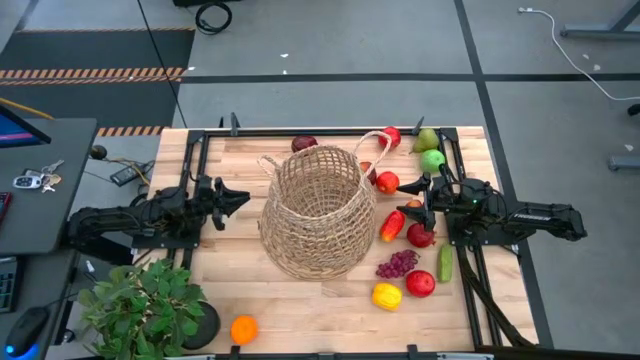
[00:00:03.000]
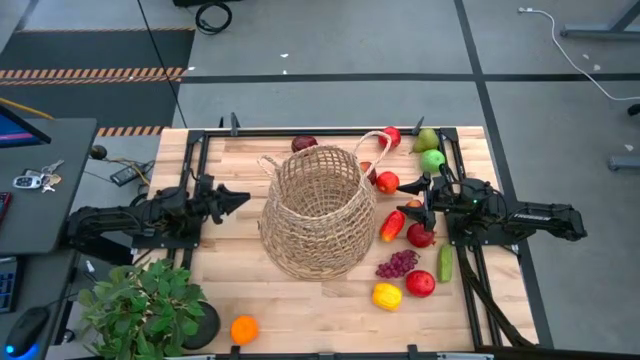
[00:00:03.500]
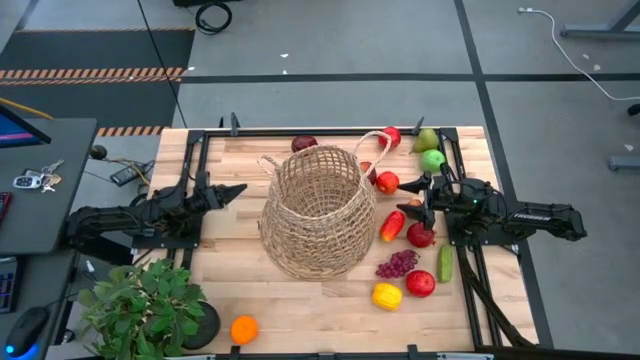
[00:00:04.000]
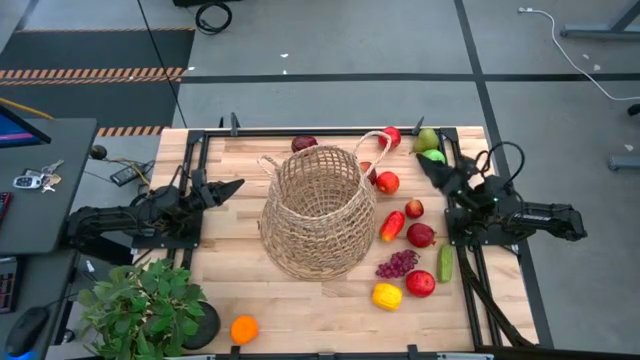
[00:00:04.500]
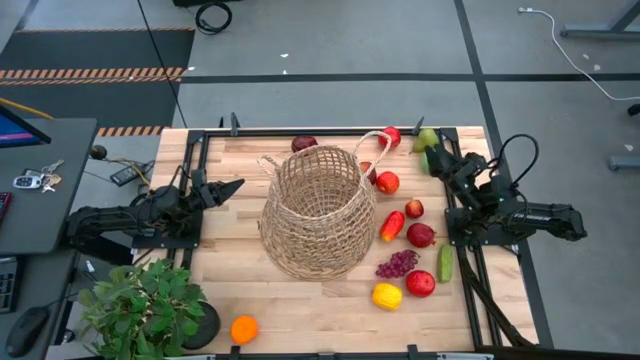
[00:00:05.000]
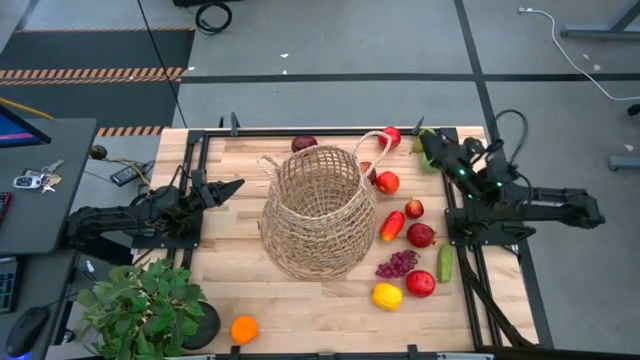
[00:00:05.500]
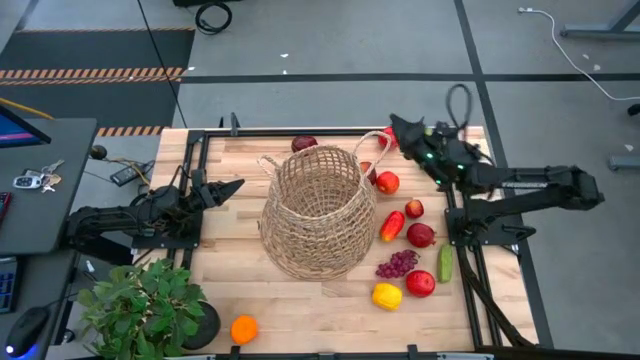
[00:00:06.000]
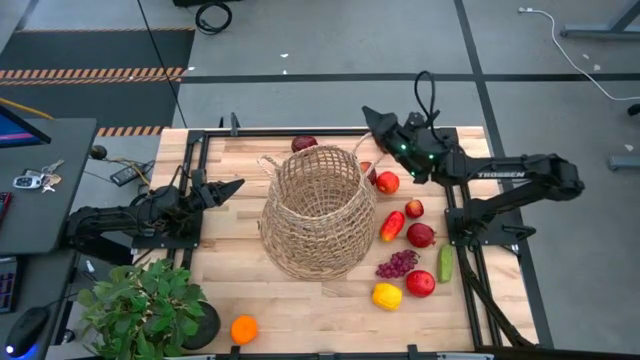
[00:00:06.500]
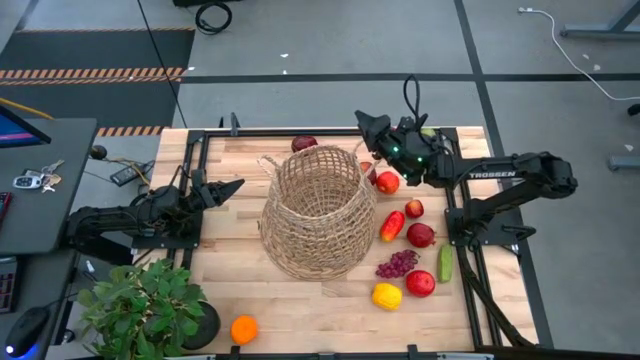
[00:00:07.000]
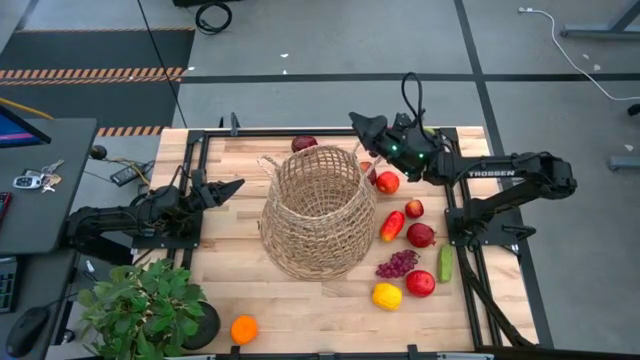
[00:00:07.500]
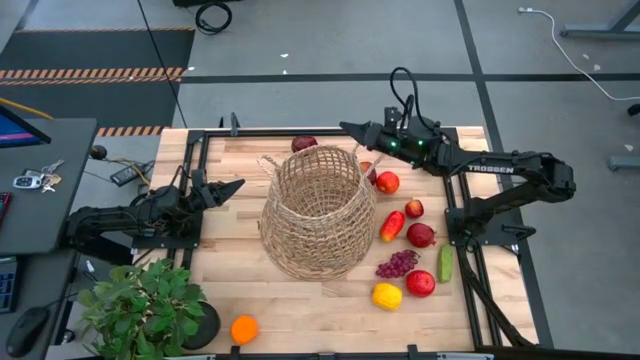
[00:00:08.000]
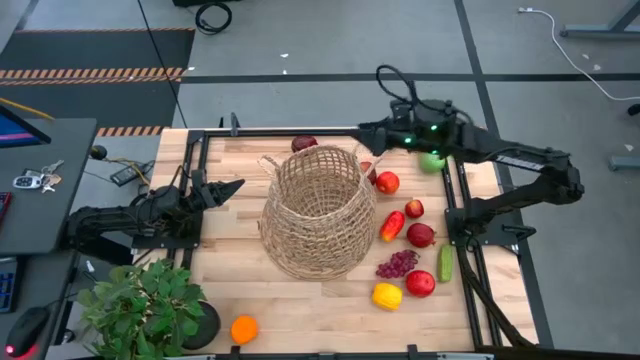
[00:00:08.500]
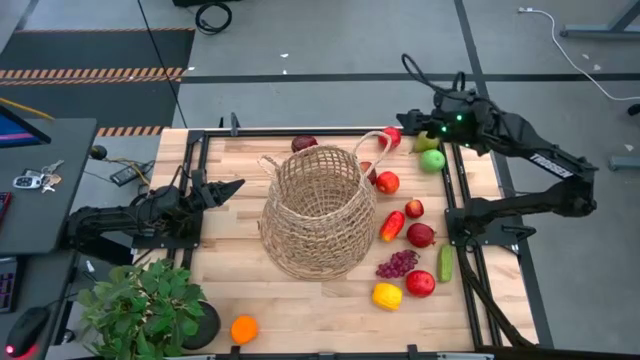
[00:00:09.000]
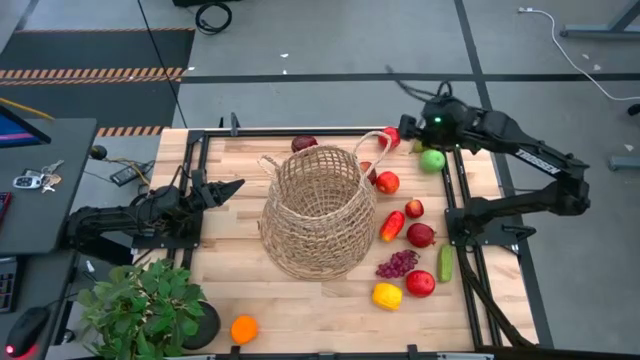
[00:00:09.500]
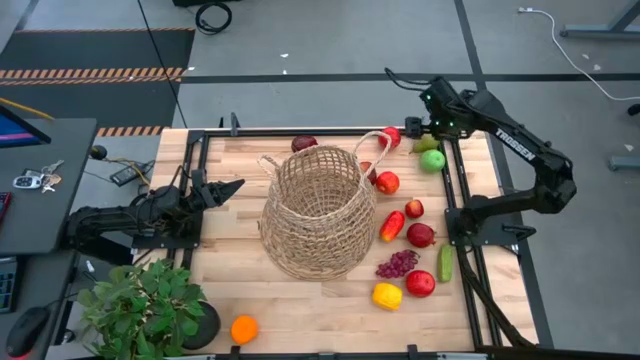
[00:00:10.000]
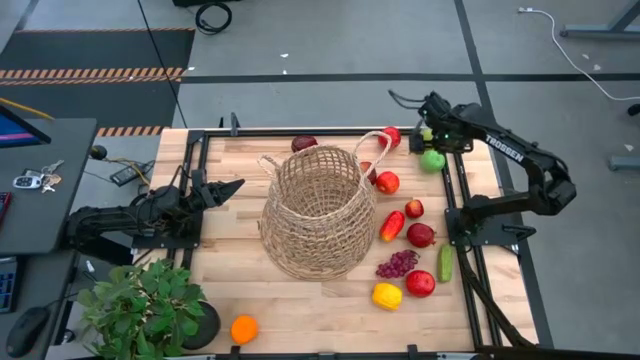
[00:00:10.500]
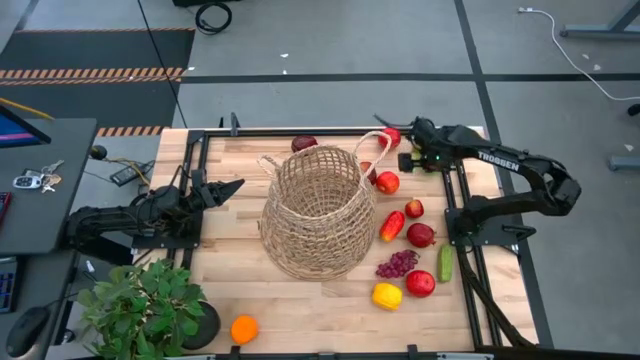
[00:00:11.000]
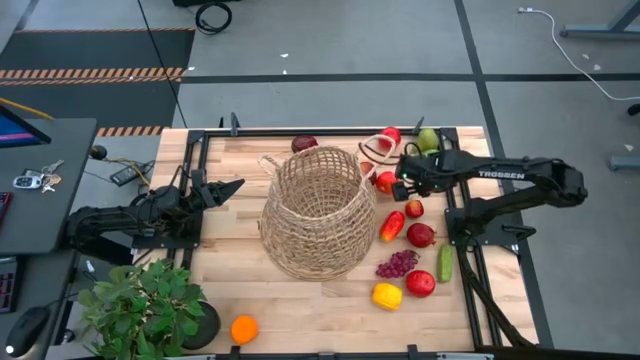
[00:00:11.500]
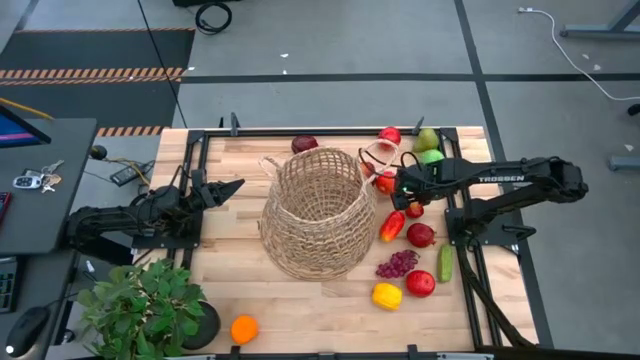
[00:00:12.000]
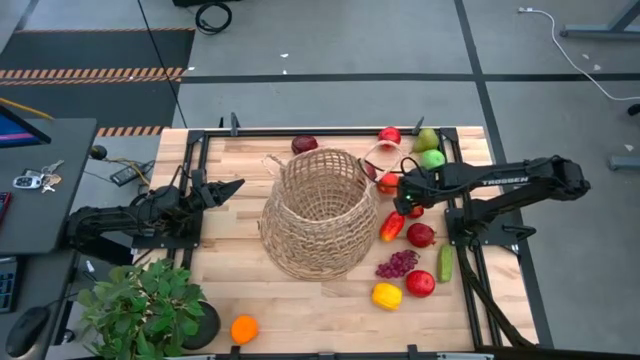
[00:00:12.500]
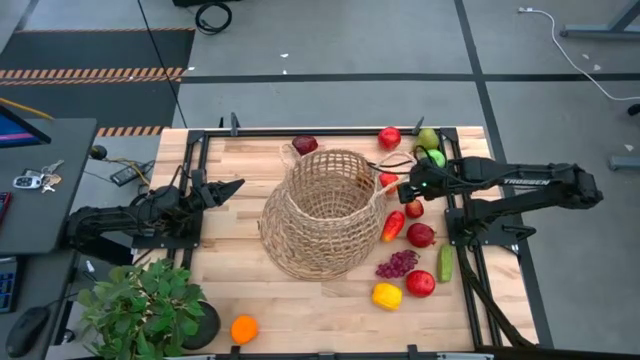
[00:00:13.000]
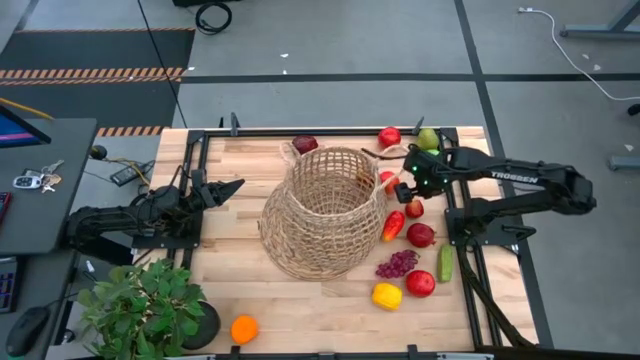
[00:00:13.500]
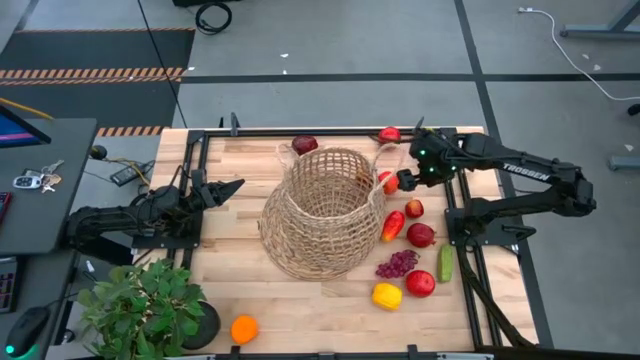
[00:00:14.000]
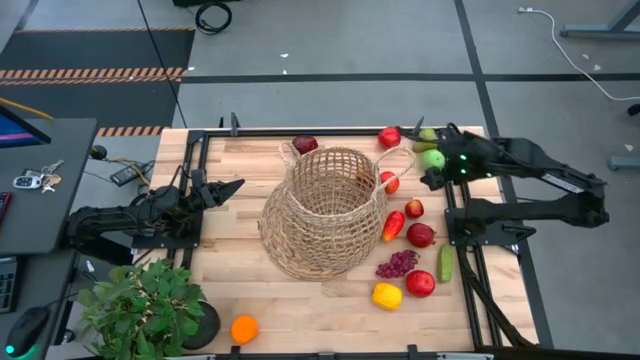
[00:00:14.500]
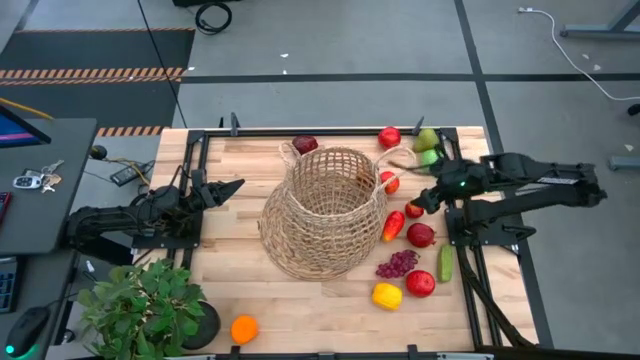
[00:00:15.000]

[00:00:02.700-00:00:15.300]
Task: Build produce basket
Put the mango into the basket

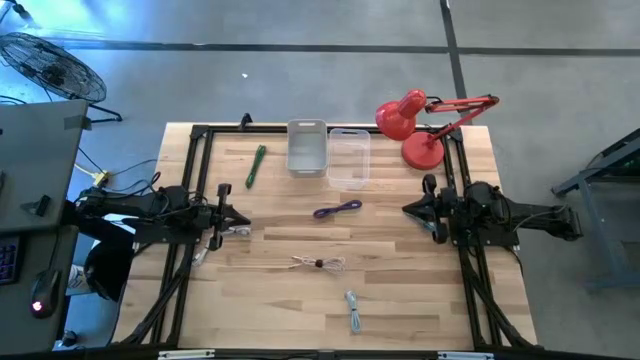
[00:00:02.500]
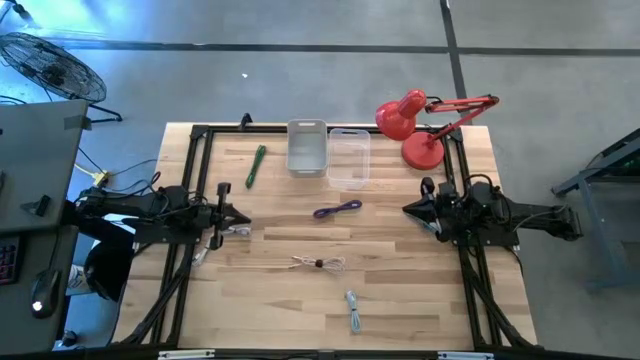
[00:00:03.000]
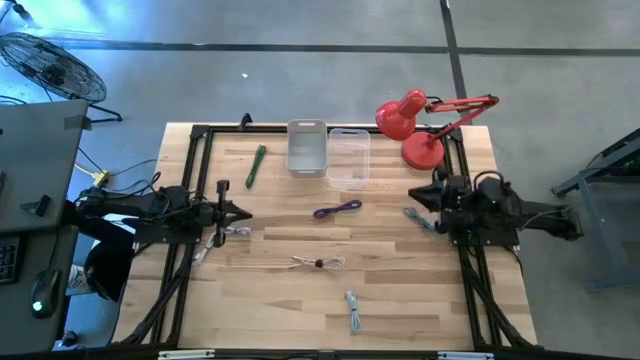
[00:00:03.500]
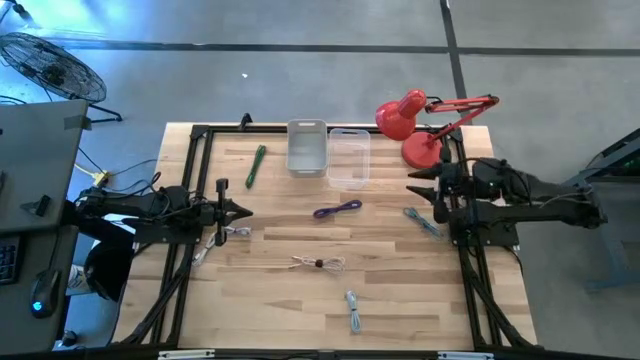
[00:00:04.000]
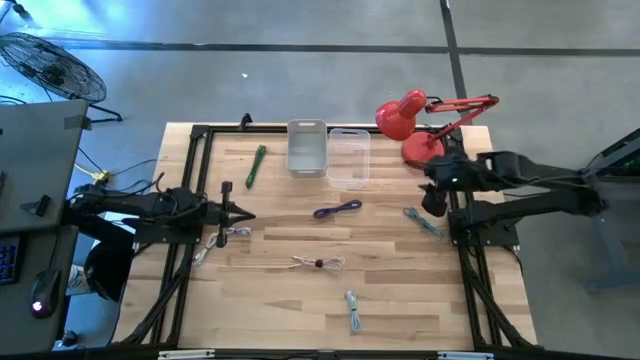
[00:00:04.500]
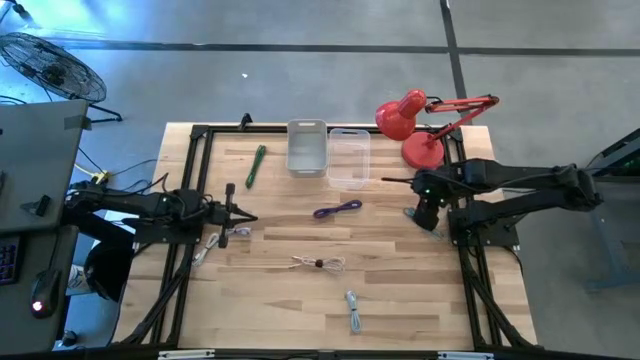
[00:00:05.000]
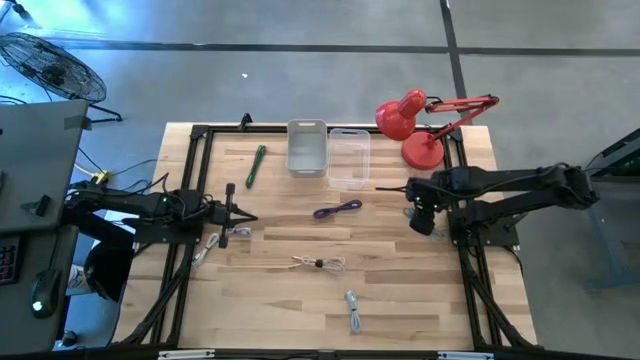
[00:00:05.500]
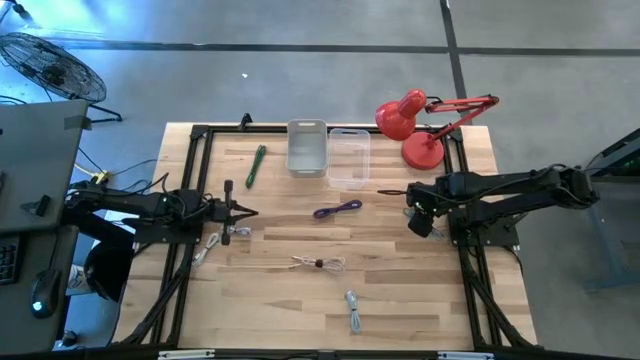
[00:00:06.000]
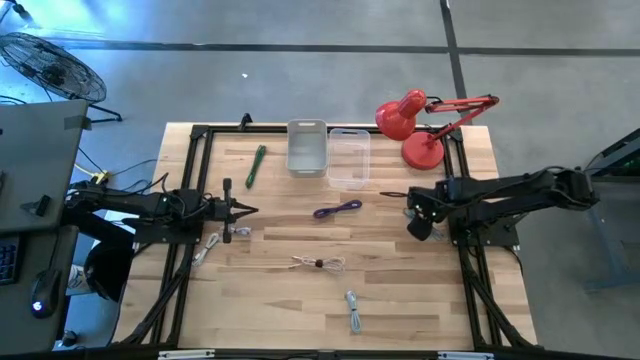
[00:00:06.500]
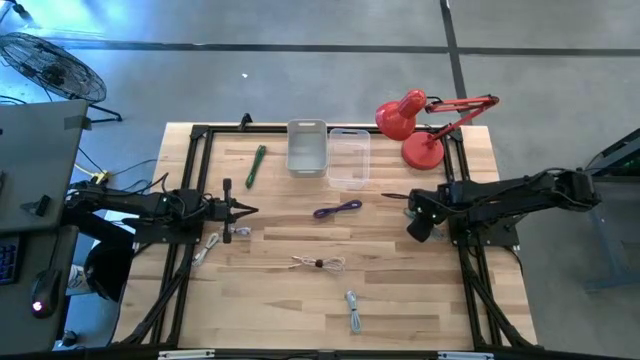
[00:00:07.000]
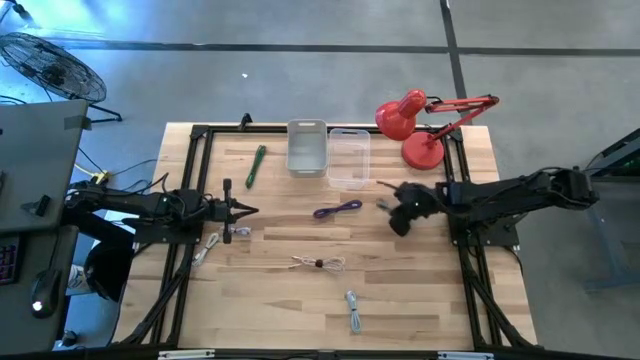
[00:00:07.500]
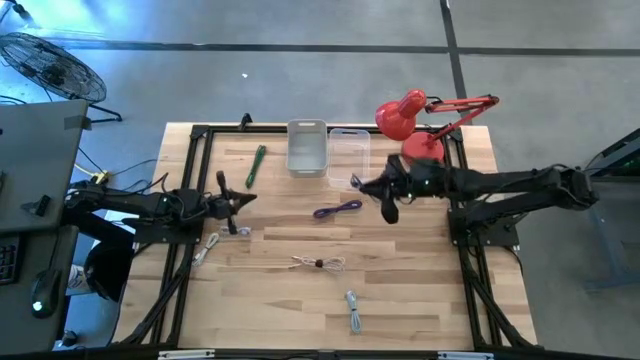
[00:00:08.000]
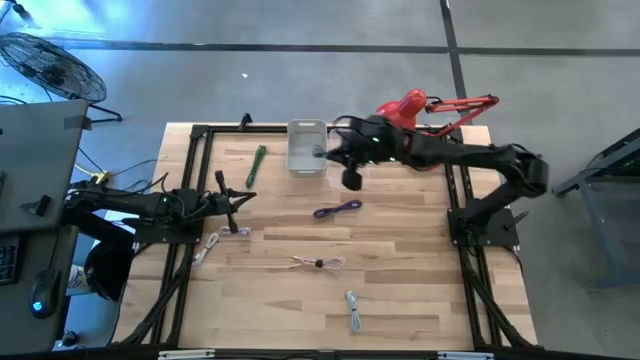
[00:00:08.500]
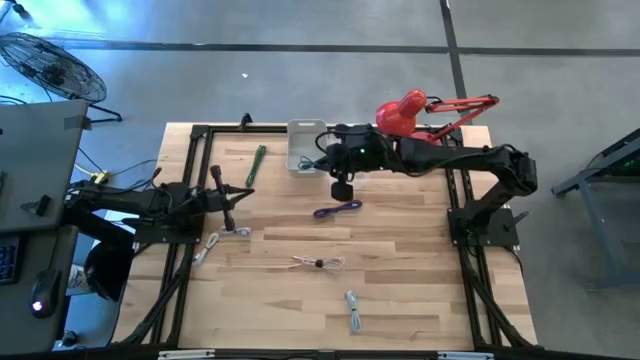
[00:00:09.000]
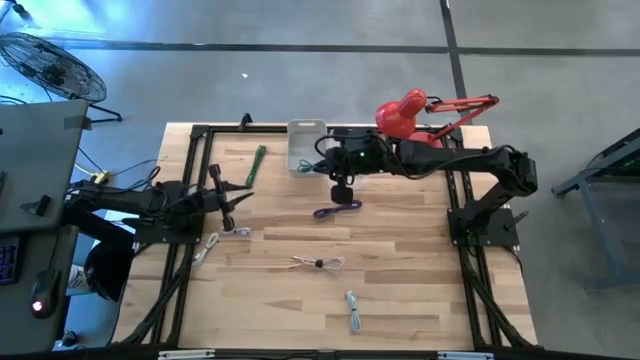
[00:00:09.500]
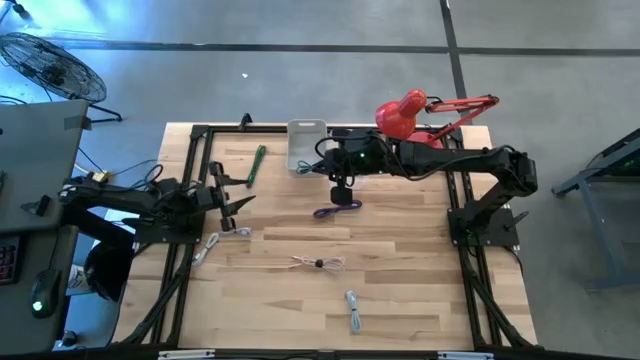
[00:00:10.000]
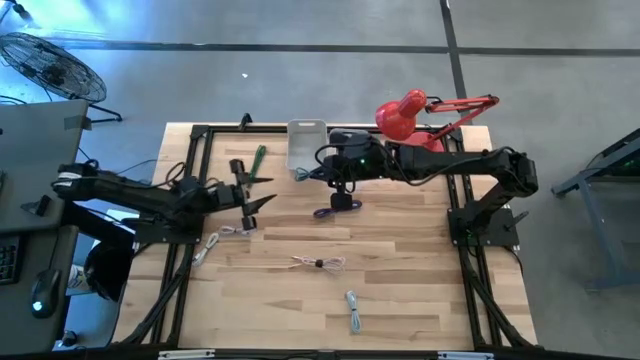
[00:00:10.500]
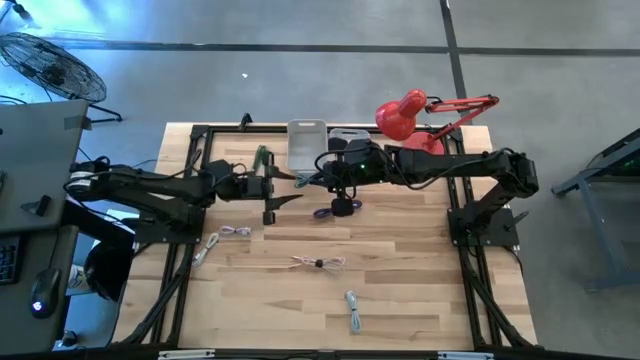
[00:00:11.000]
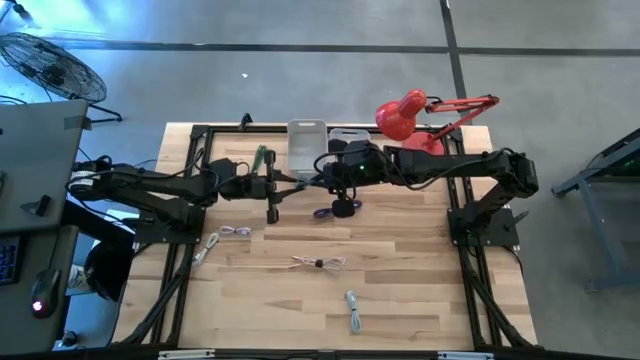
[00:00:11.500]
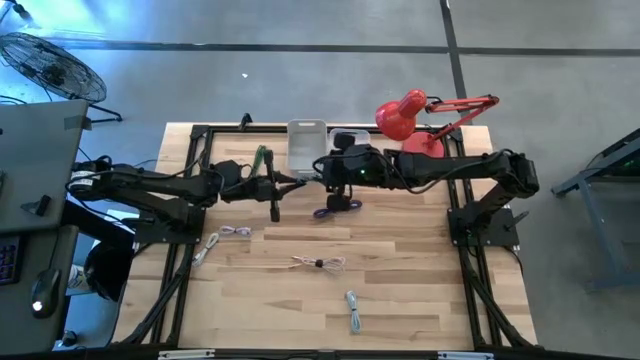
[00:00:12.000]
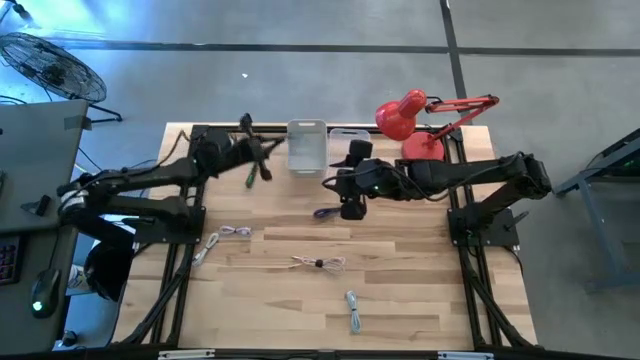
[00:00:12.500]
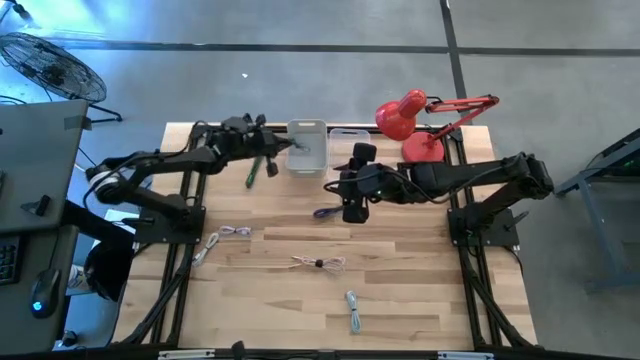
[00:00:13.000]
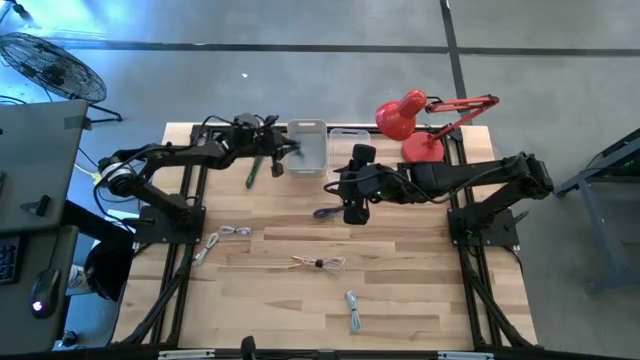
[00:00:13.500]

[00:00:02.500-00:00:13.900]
Task: Pick & Place USB Port
Put the blue patterned charger cable into the gray bin
